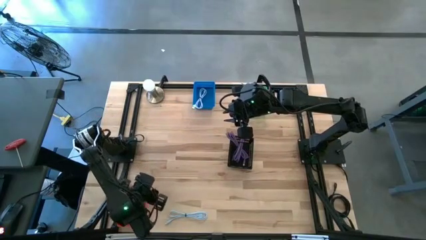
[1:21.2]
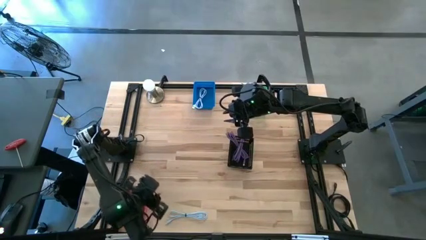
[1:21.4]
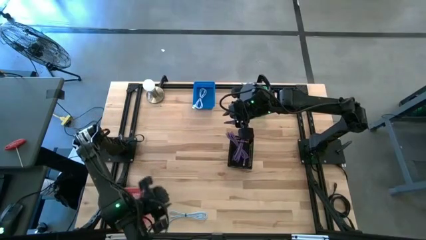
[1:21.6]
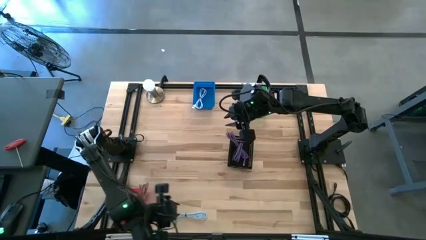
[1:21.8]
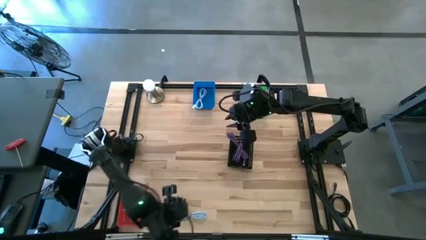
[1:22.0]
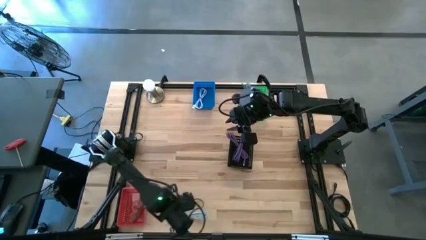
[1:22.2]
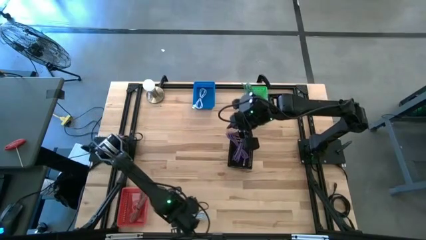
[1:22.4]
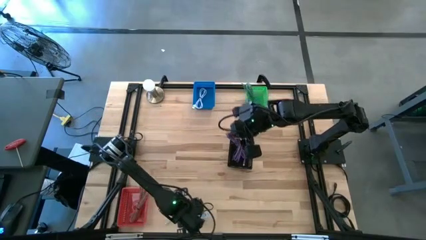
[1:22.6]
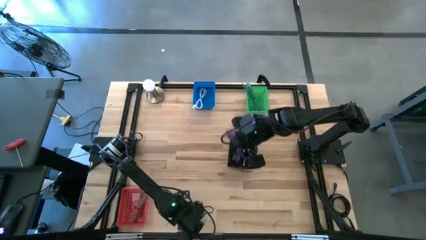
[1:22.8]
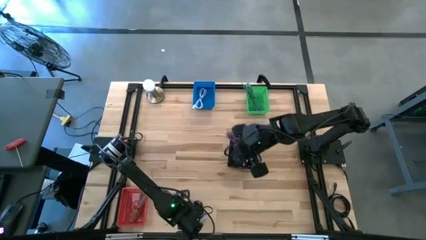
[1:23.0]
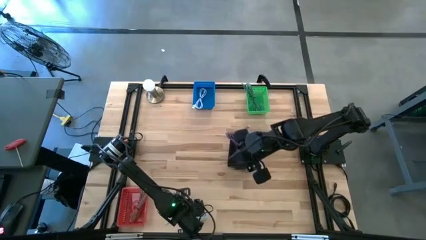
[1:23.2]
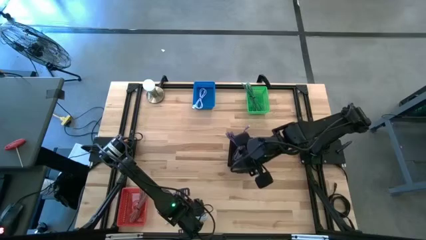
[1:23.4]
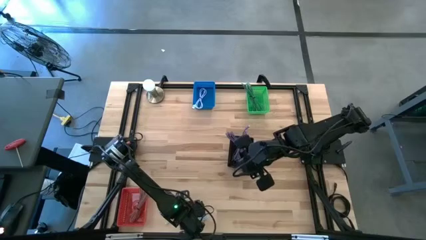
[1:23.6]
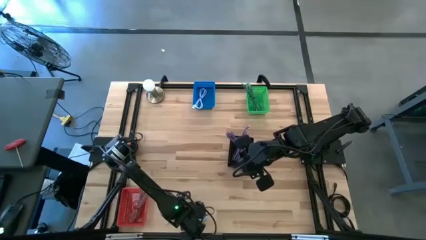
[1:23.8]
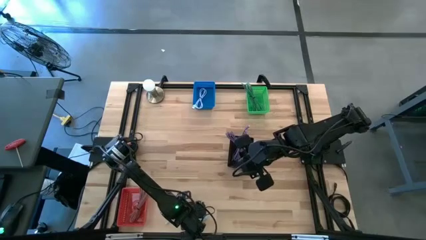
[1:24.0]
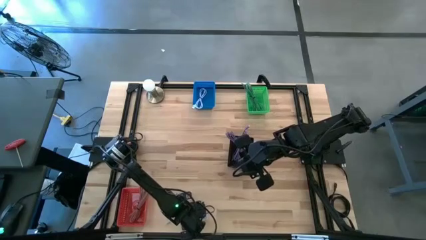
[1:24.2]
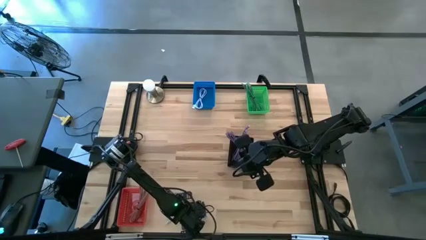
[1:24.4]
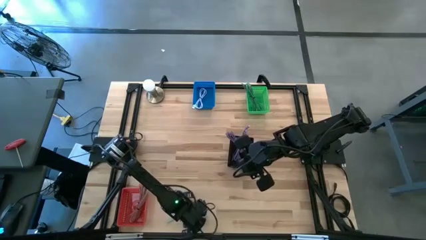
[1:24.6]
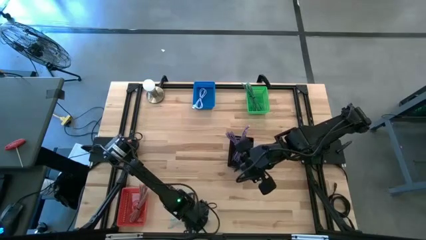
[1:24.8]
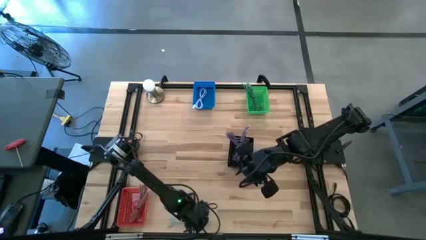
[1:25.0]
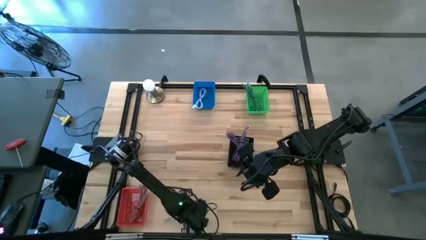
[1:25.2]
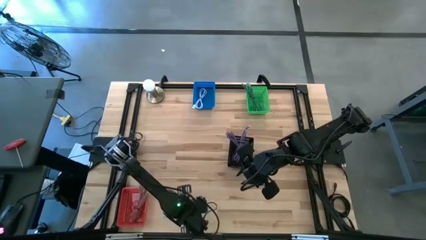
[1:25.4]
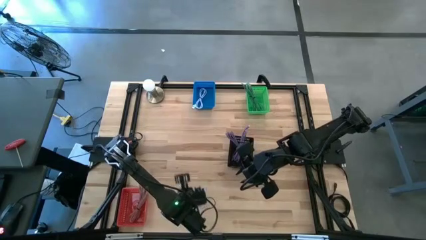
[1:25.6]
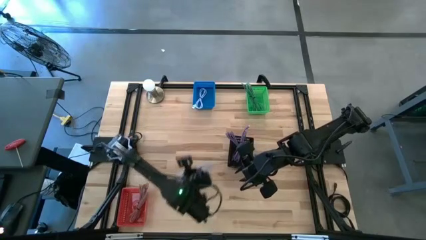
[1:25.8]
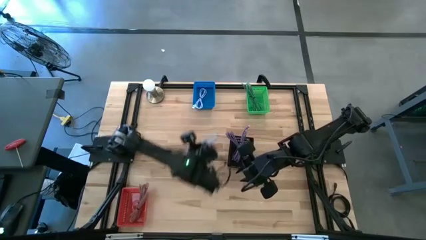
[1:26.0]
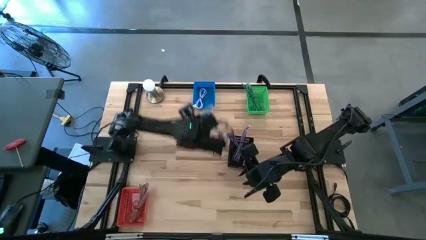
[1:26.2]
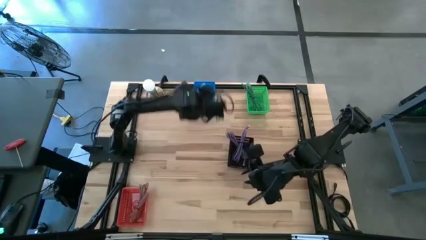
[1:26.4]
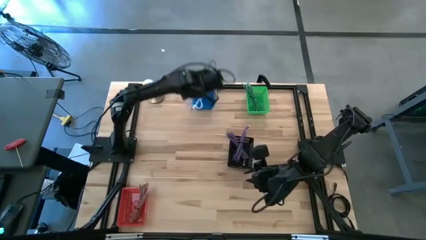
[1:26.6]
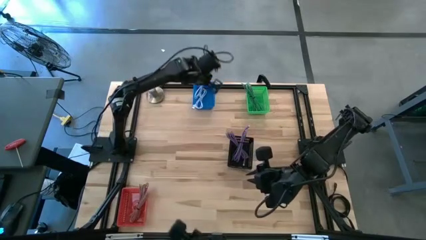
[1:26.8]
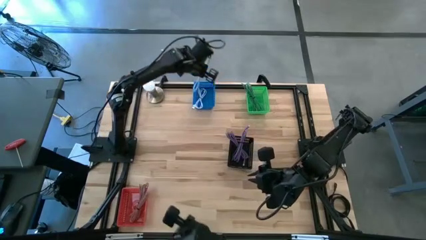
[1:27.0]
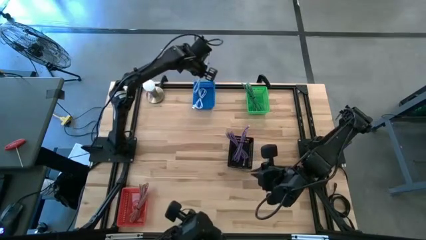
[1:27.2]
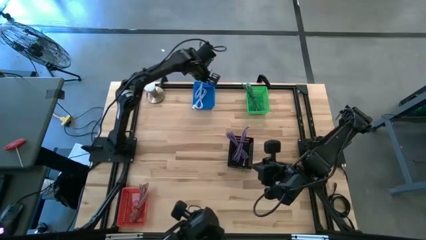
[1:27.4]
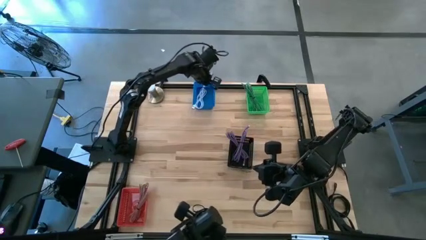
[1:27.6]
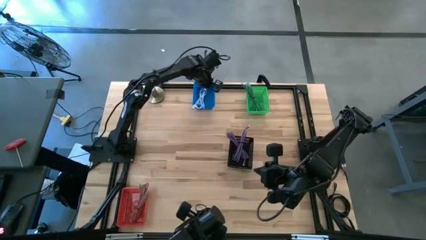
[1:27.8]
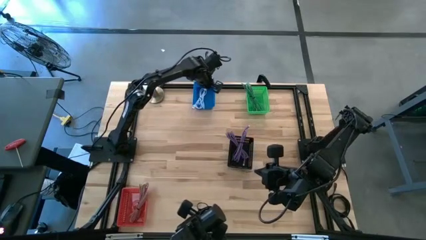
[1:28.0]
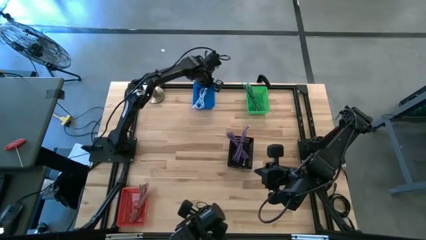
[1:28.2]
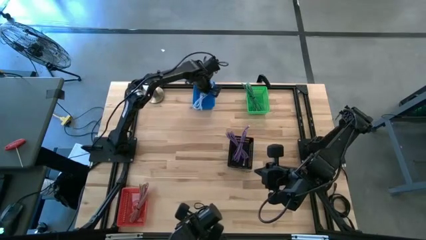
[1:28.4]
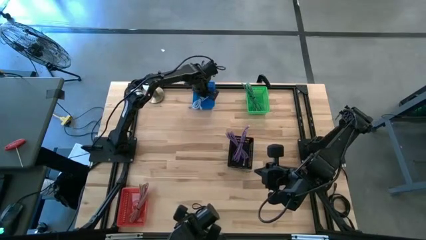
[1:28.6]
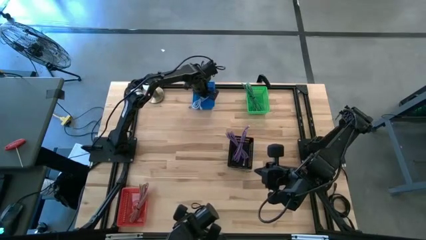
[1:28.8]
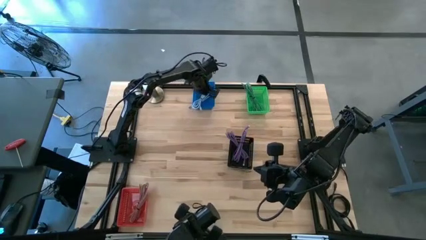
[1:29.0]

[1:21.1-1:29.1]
Task: Pick & Place USB Port
Put the white charger cable into the blue bin
